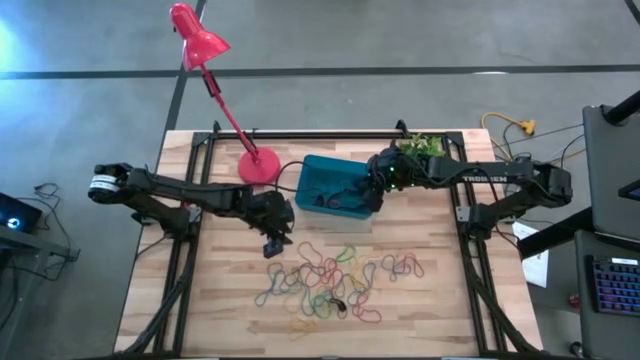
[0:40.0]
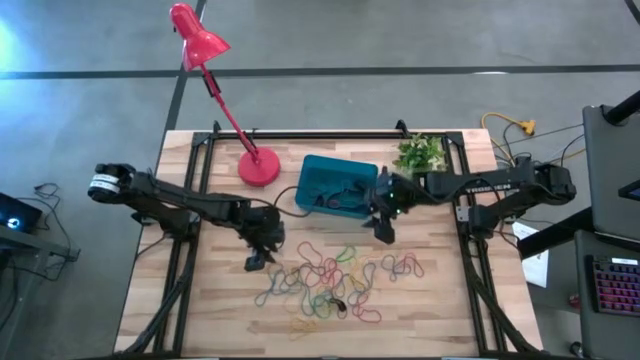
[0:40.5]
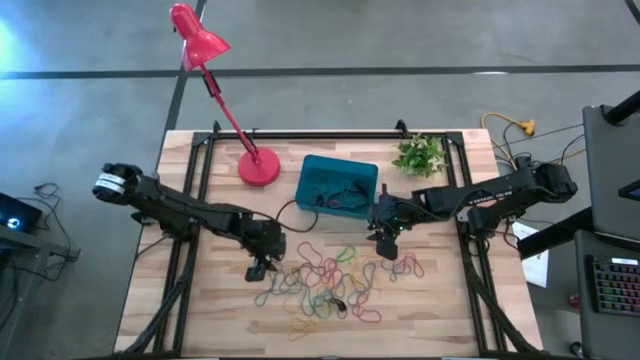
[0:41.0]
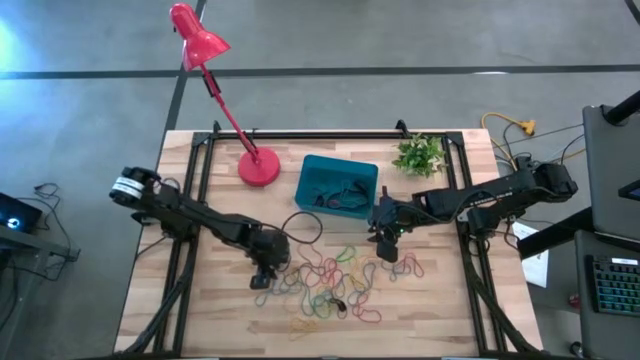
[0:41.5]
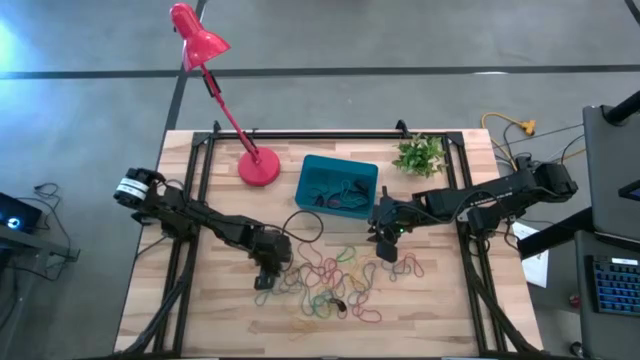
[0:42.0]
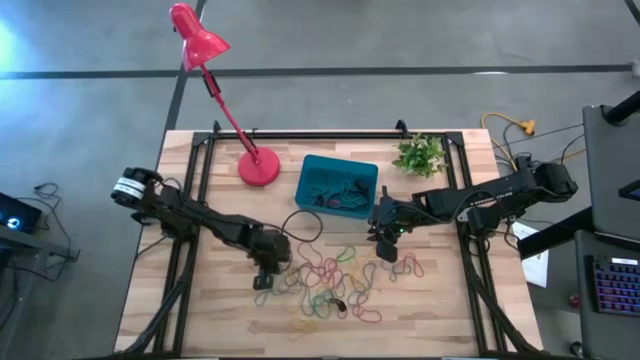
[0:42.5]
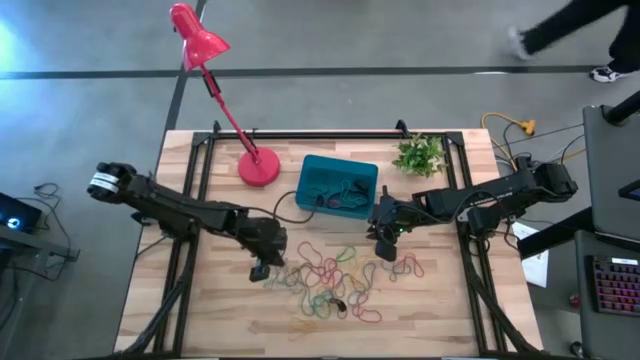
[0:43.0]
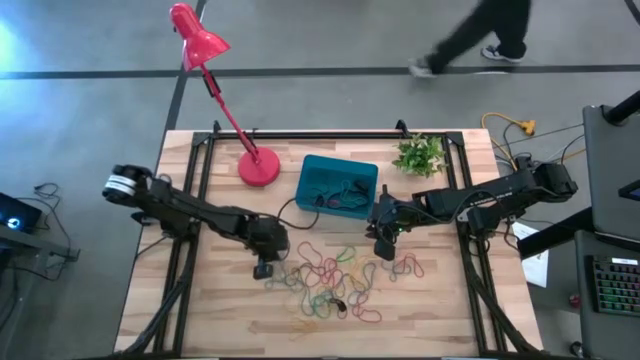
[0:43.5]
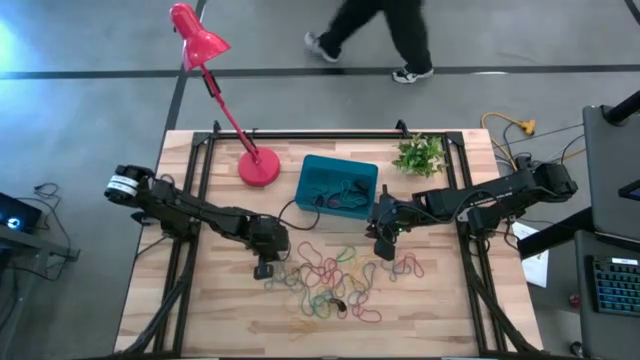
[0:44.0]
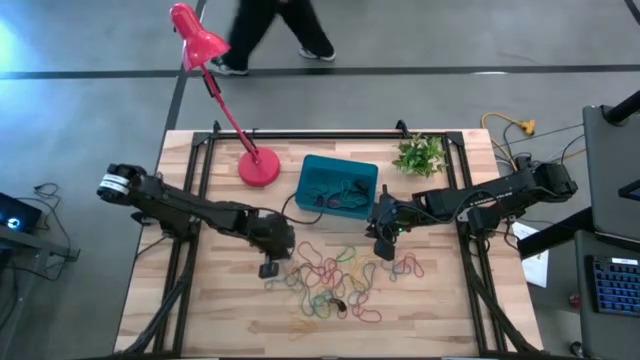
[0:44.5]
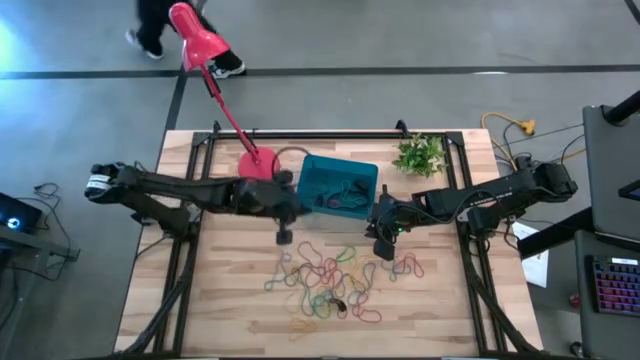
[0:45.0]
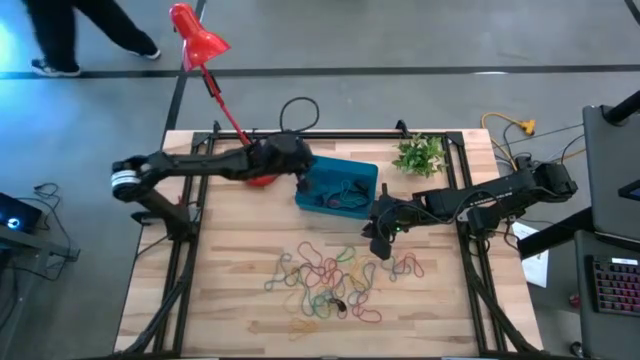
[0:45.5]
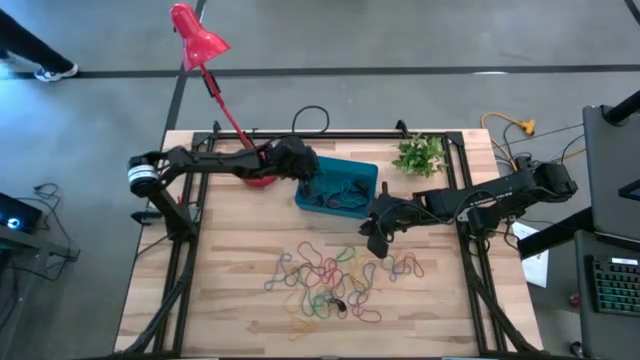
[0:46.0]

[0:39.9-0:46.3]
Task: Pick and place rubber bands into bin
Put the blue rubber band into the blue bin

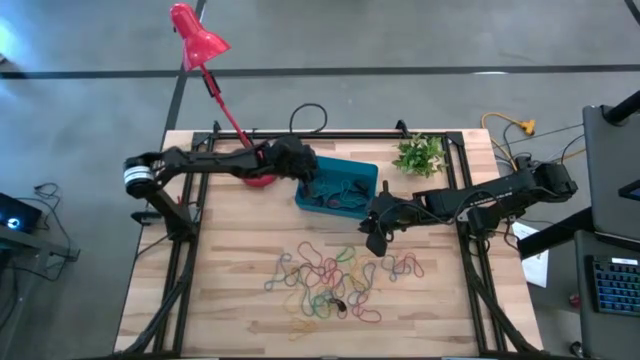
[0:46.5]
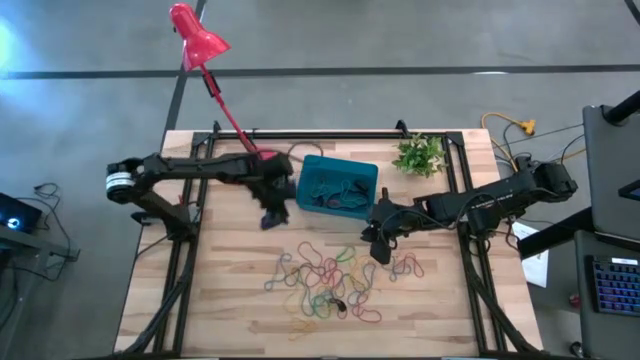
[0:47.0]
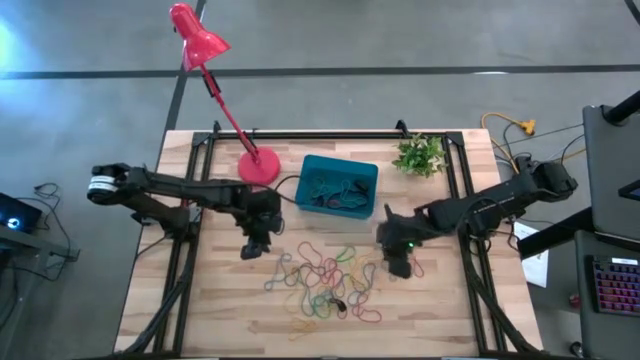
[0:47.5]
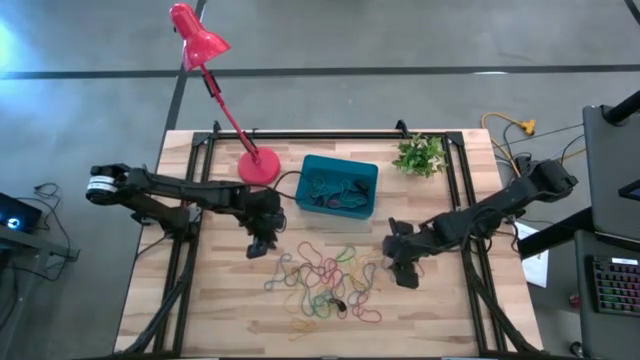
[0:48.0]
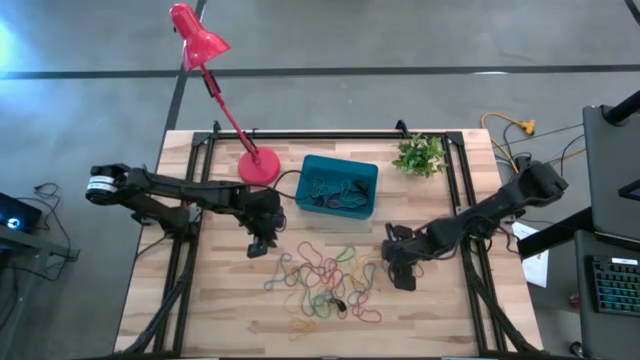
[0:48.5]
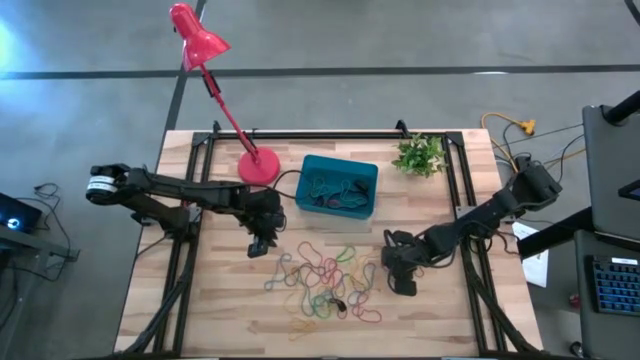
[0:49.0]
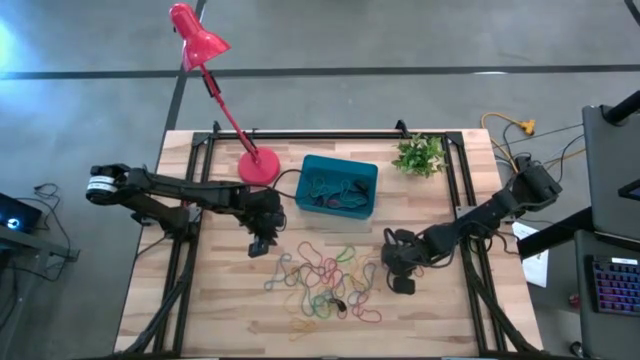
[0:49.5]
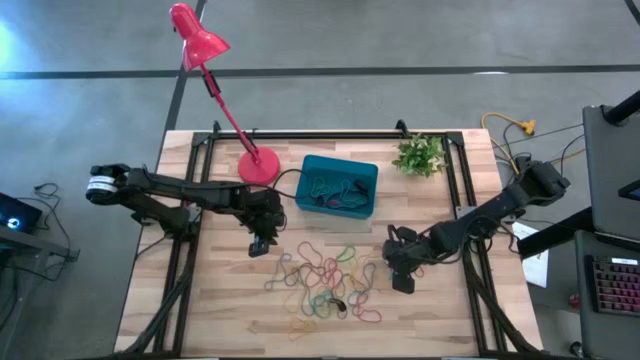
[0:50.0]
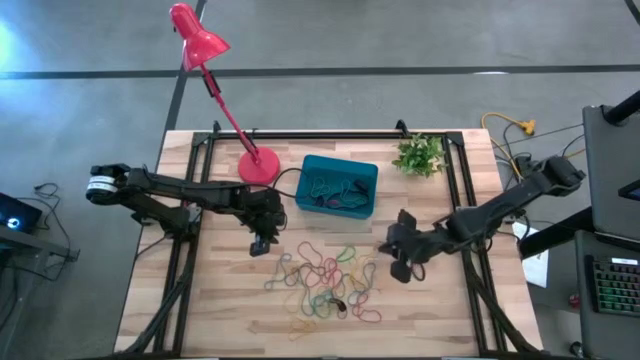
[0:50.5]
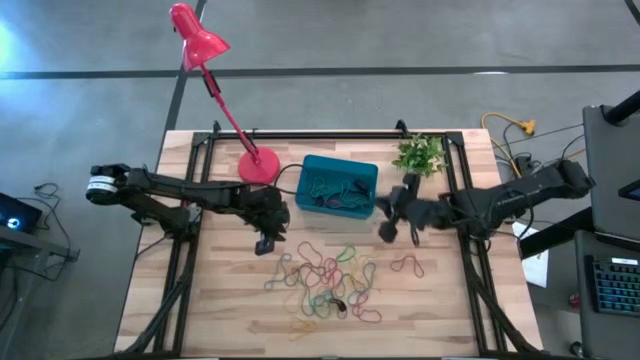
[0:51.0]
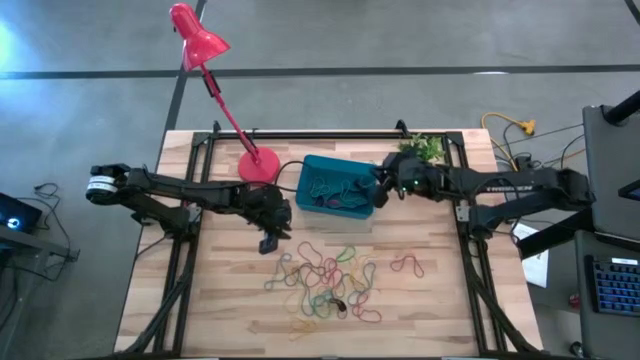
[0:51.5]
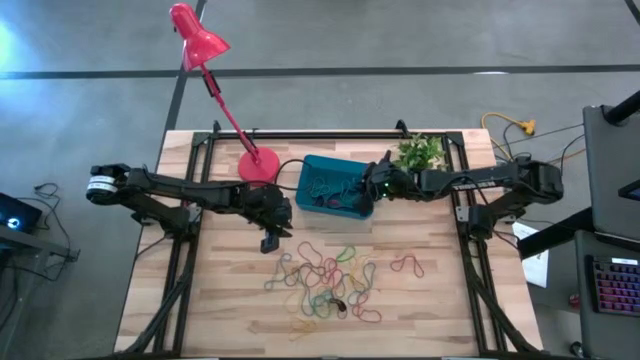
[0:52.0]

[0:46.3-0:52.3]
Put the blue rubber band into the blue bin

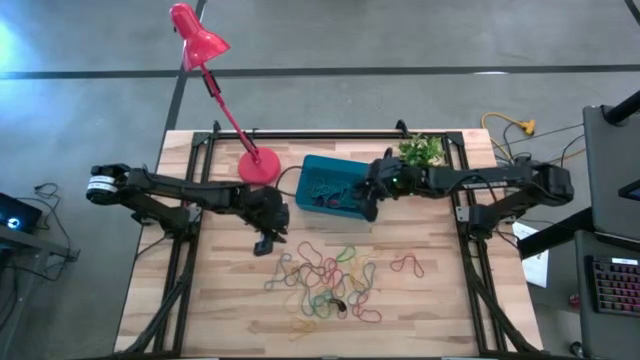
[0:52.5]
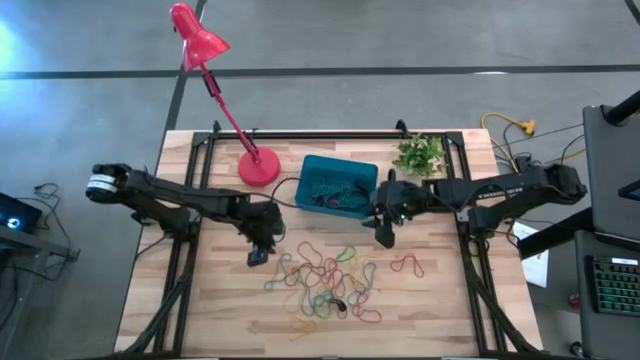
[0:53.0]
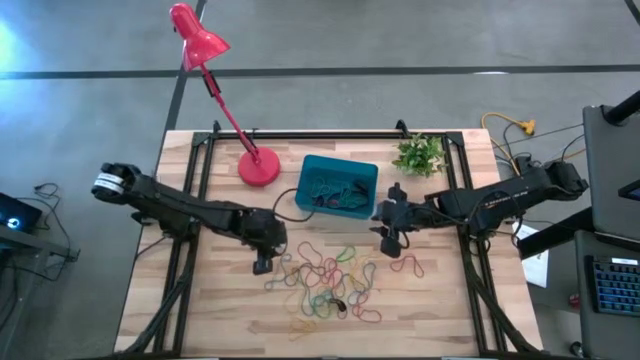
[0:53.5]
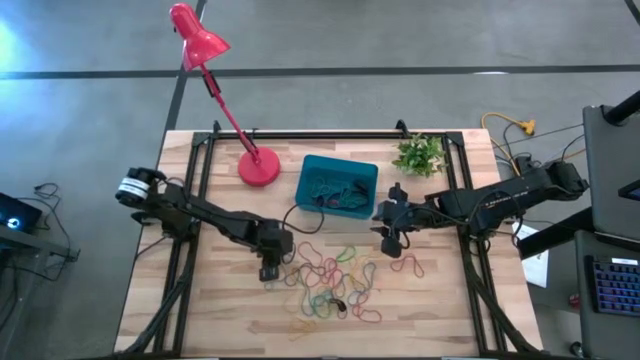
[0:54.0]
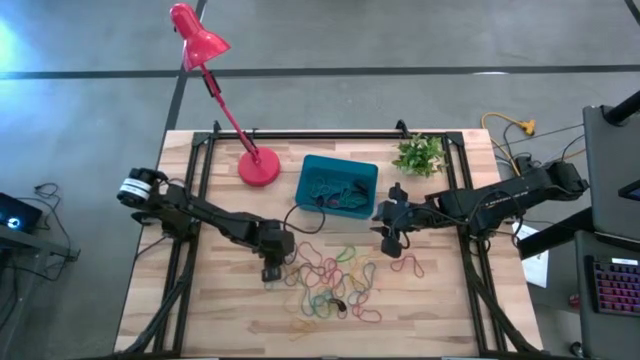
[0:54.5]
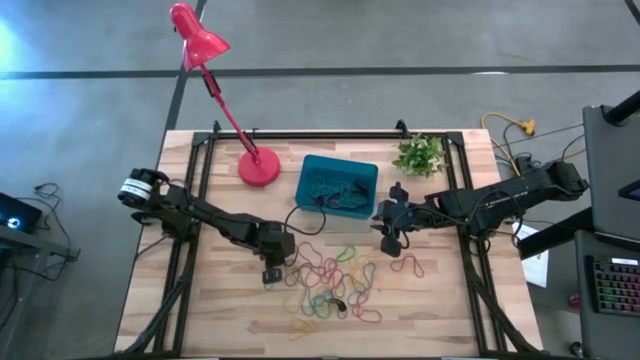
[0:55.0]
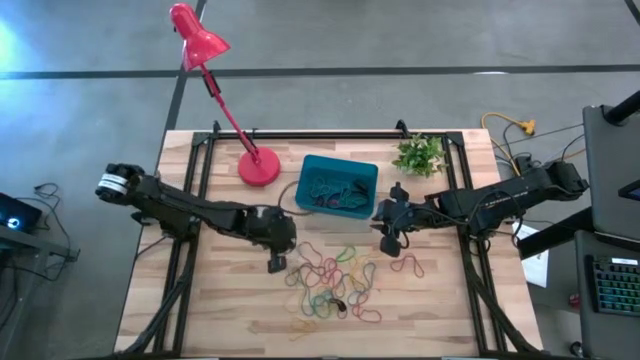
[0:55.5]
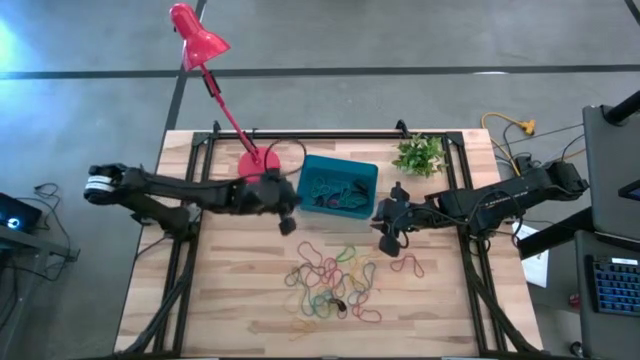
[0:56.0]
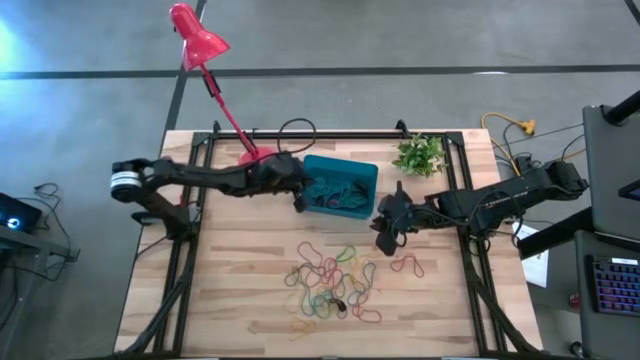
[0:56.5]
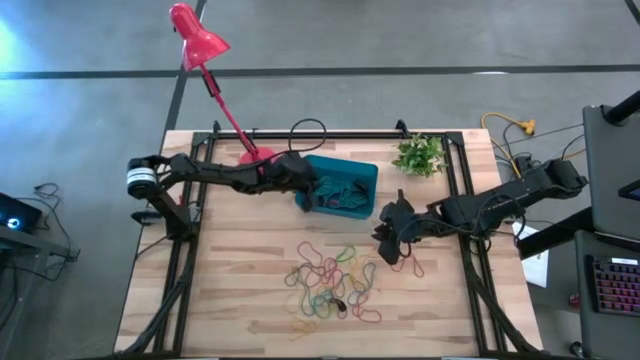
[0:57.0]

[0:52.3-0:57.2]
Put the blue rubber band into the blue bin

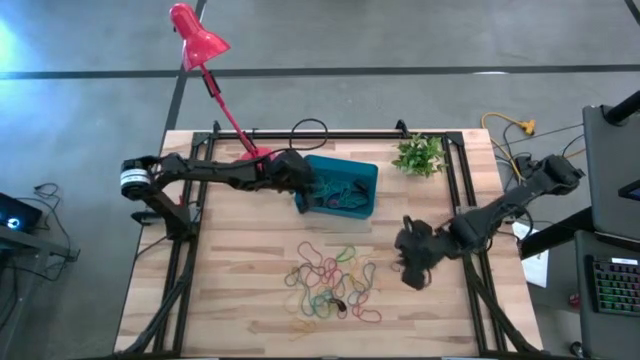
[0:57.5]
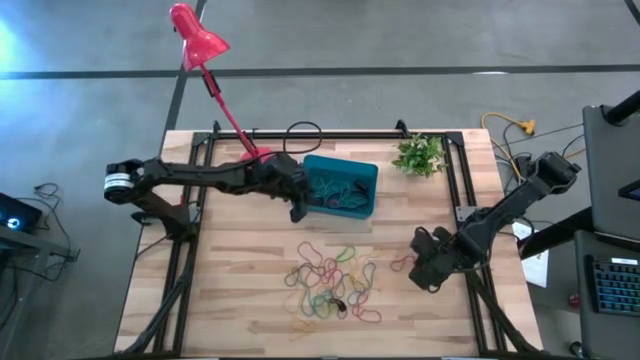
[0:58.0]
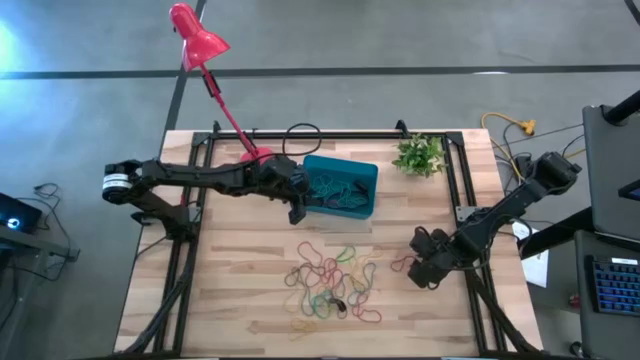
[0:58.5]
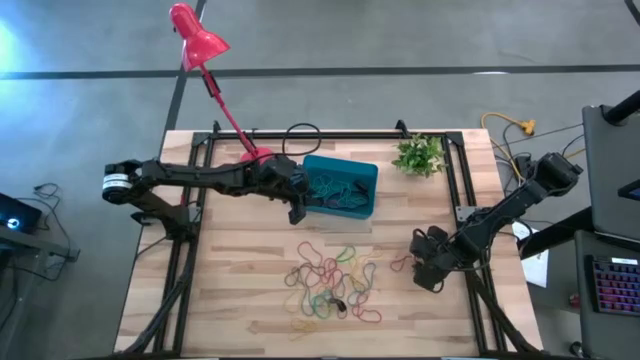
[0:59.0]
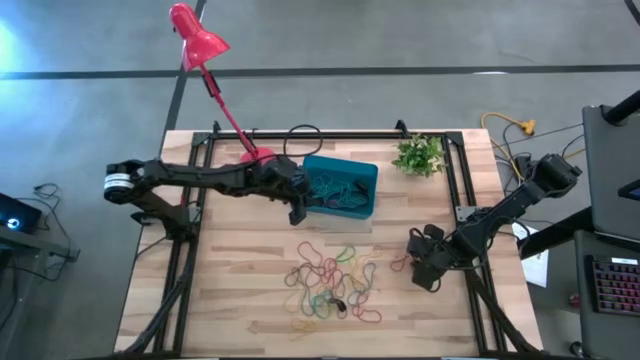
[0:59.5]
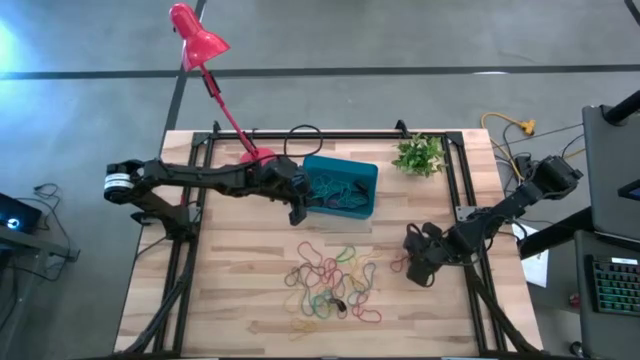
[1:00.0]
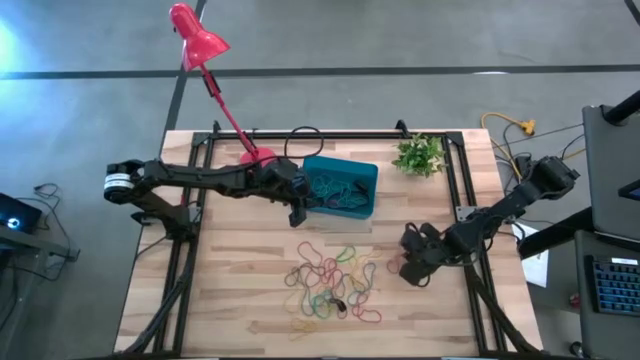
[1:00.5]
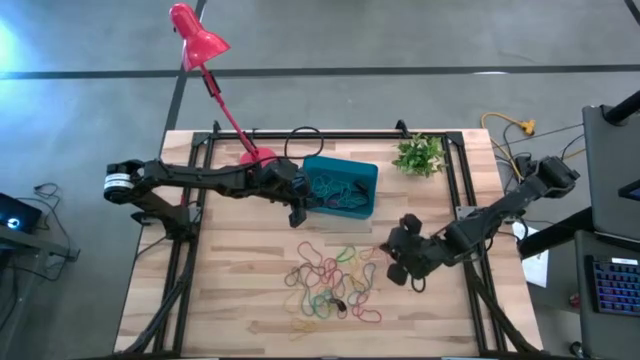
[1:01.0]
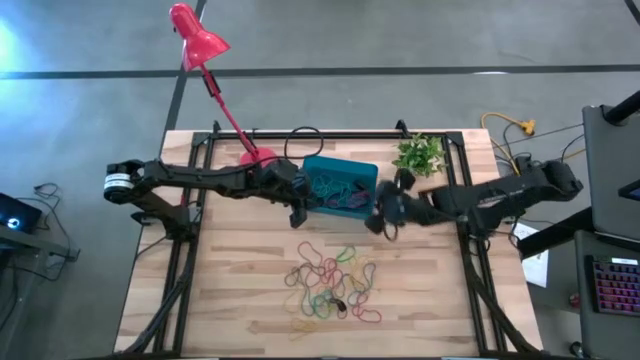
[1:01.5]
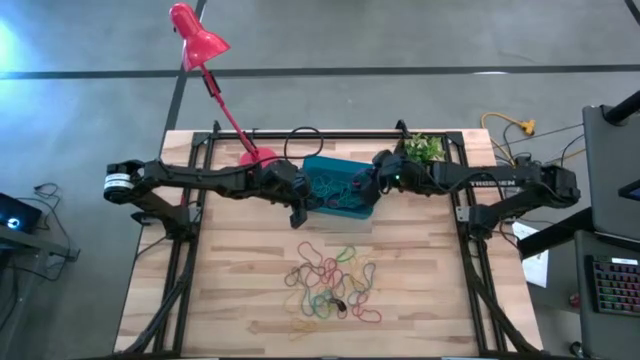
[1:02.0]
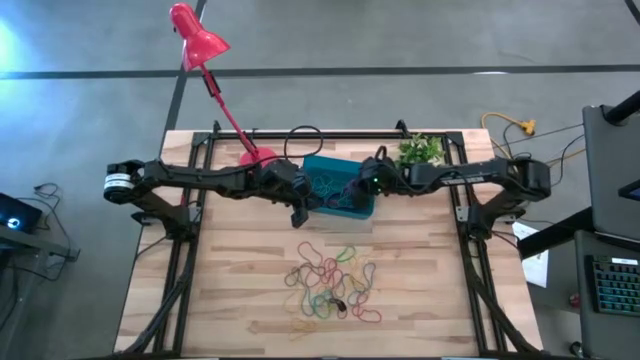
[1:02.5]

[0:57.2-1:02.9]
Put the red rubber band into the blue bin
